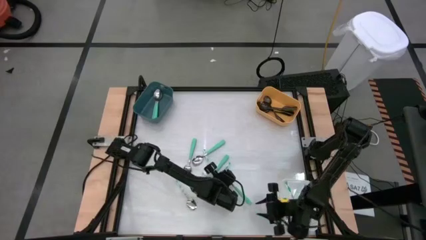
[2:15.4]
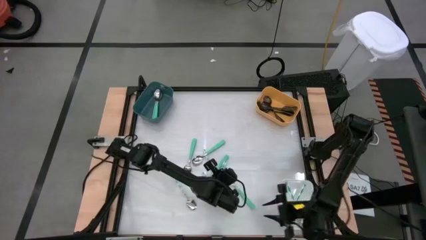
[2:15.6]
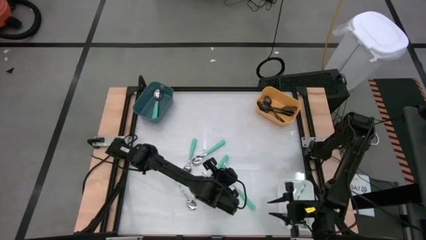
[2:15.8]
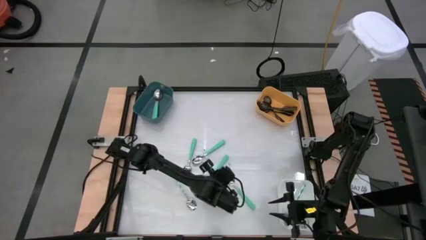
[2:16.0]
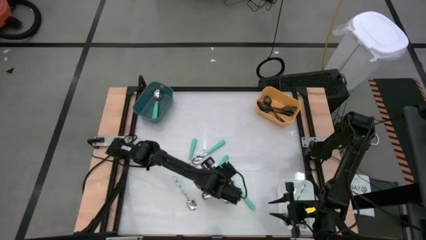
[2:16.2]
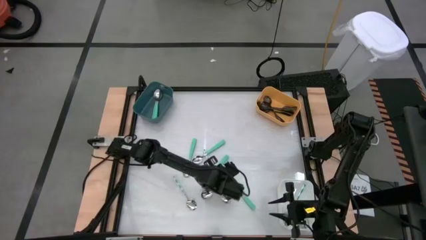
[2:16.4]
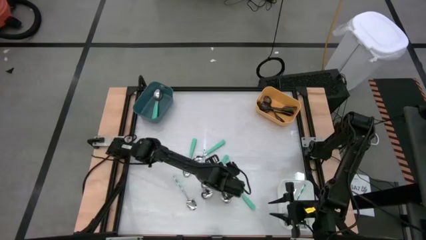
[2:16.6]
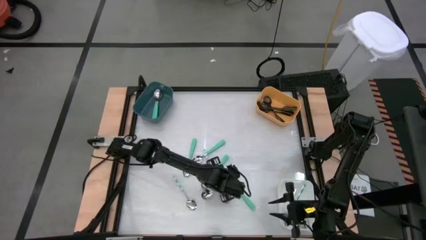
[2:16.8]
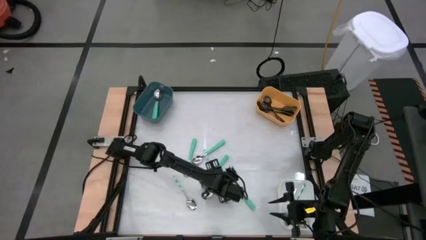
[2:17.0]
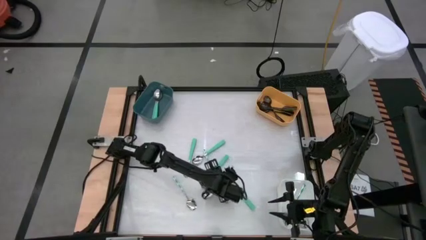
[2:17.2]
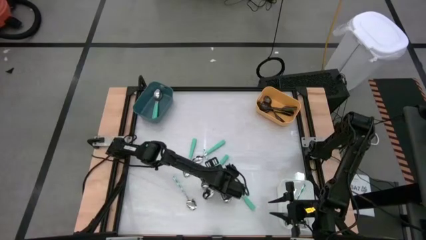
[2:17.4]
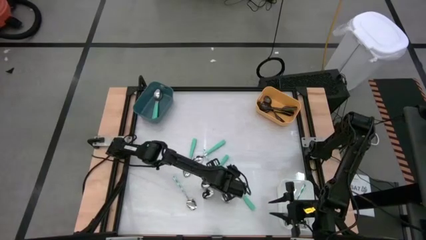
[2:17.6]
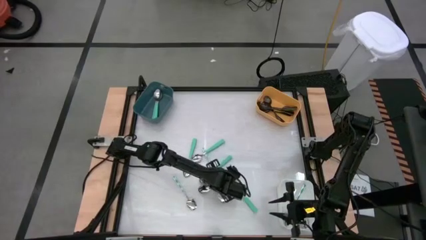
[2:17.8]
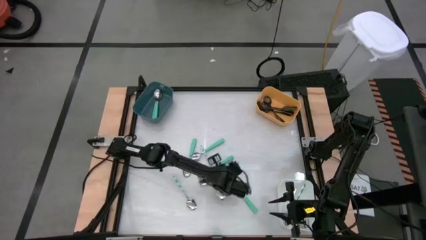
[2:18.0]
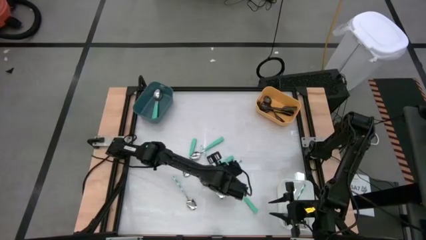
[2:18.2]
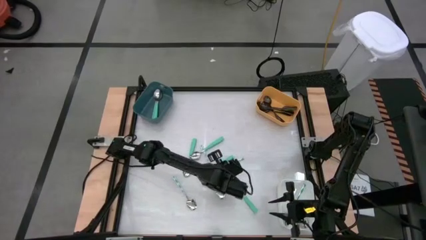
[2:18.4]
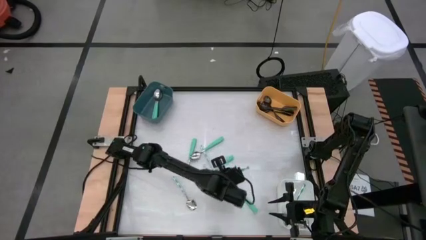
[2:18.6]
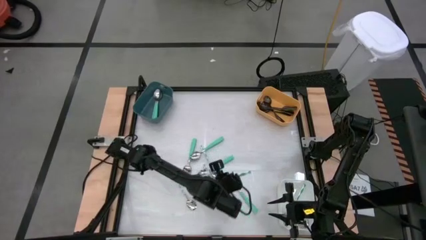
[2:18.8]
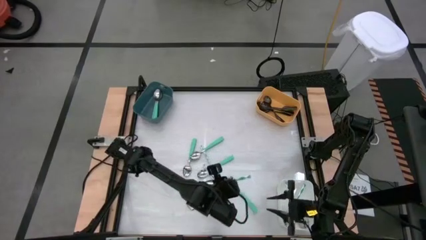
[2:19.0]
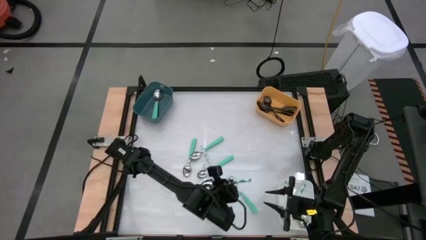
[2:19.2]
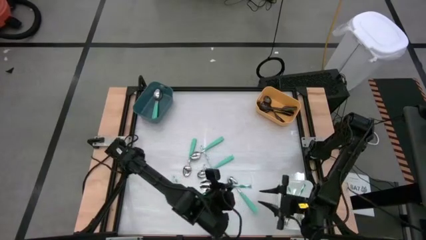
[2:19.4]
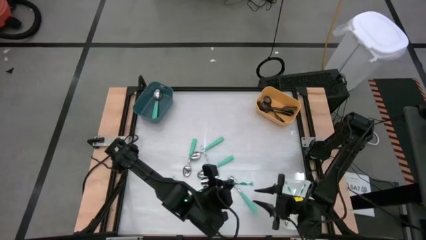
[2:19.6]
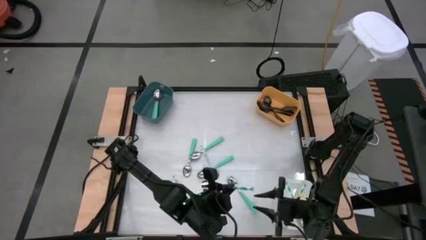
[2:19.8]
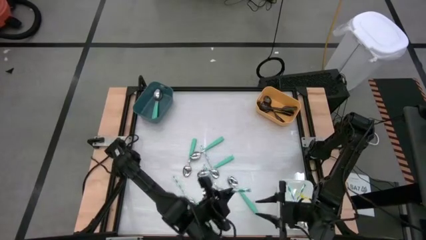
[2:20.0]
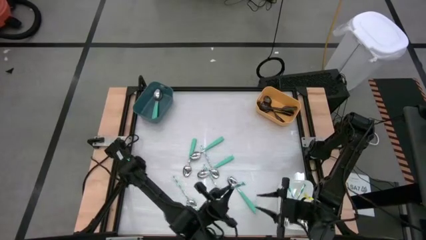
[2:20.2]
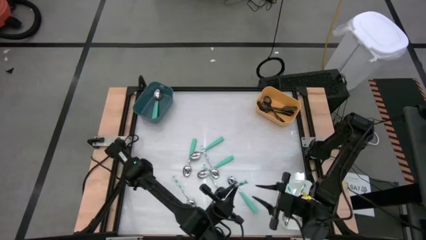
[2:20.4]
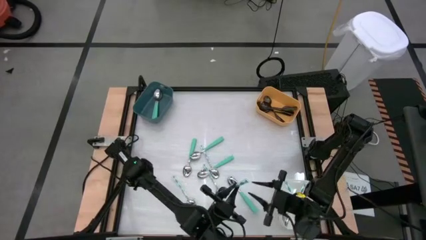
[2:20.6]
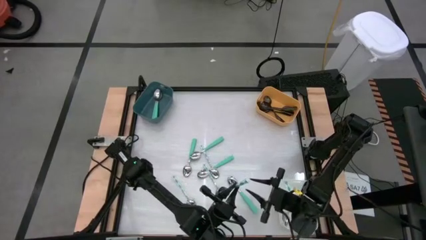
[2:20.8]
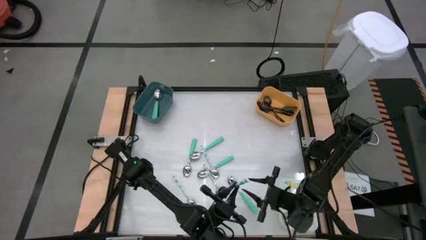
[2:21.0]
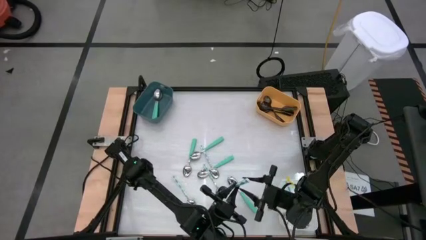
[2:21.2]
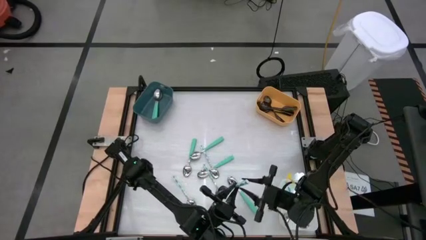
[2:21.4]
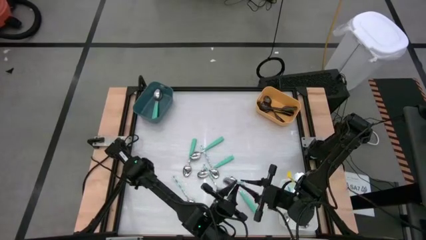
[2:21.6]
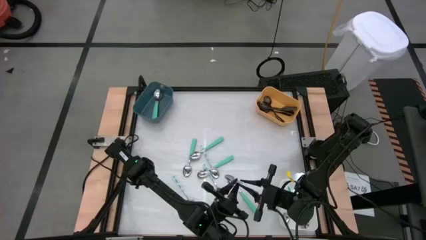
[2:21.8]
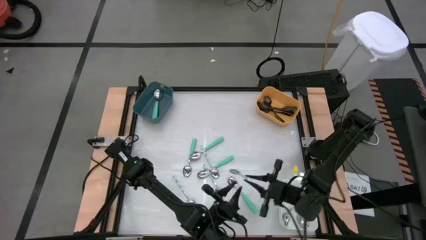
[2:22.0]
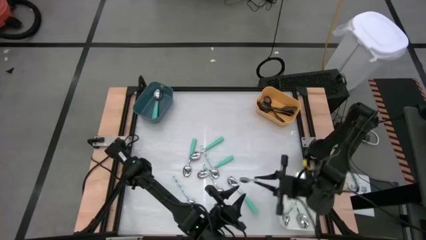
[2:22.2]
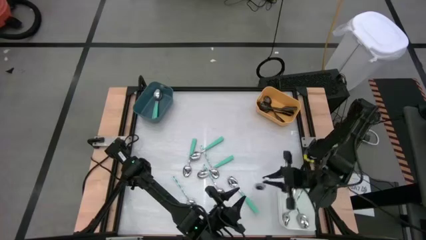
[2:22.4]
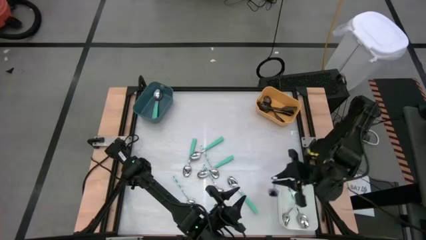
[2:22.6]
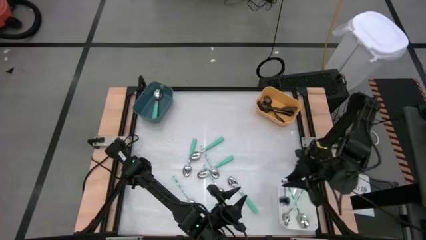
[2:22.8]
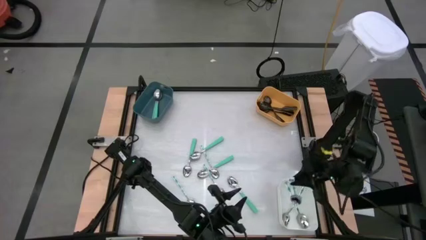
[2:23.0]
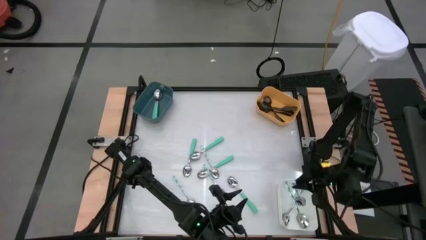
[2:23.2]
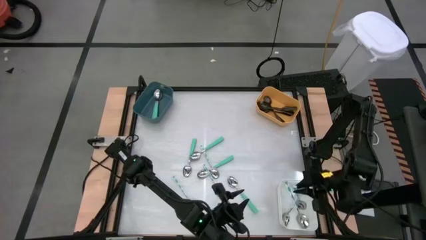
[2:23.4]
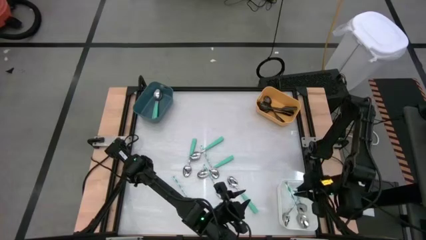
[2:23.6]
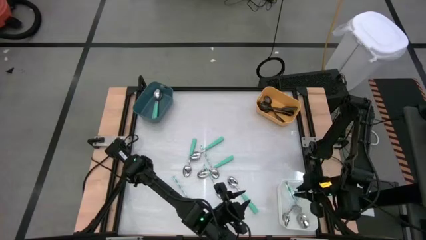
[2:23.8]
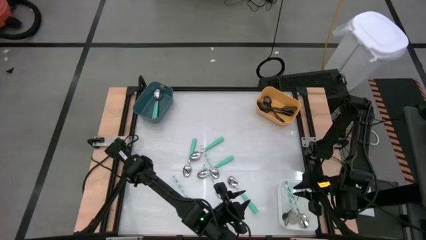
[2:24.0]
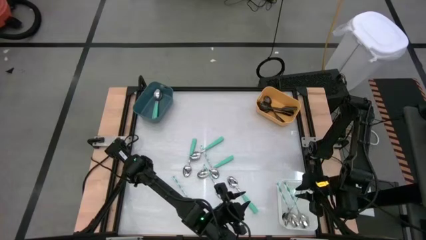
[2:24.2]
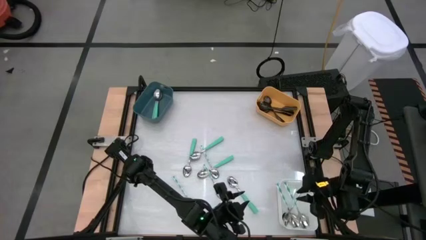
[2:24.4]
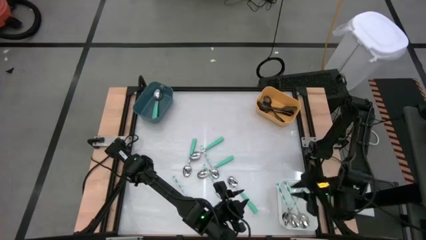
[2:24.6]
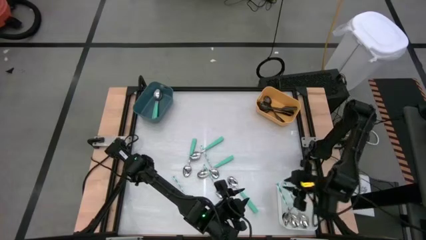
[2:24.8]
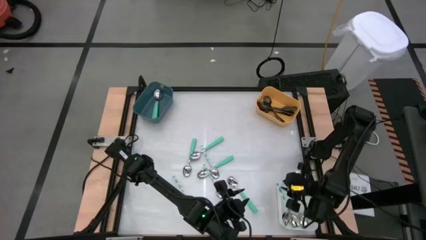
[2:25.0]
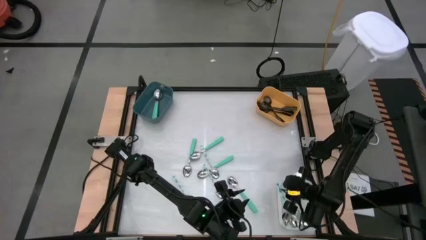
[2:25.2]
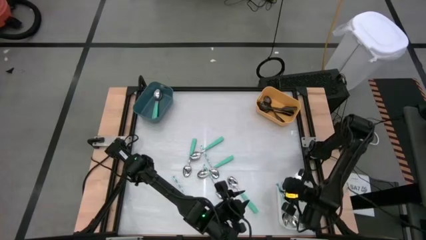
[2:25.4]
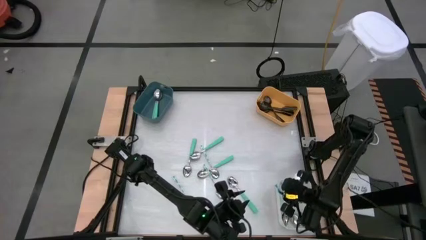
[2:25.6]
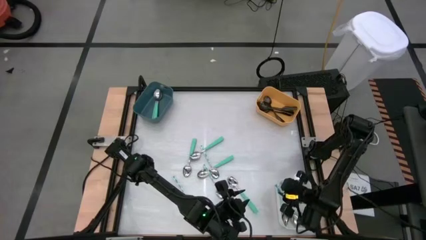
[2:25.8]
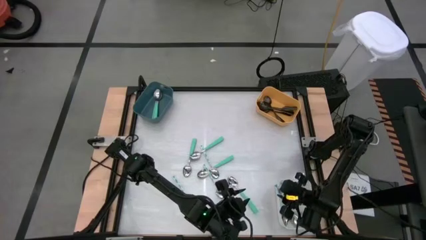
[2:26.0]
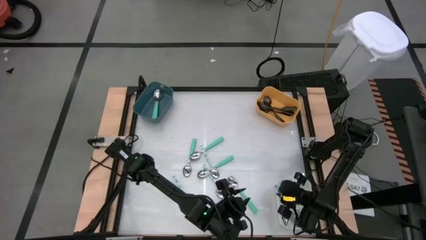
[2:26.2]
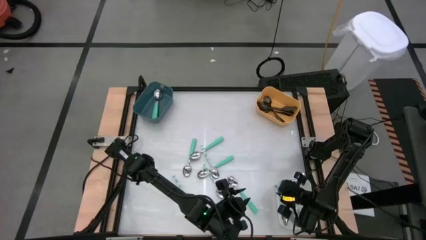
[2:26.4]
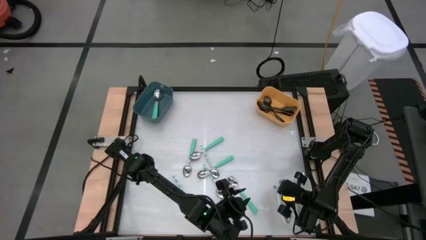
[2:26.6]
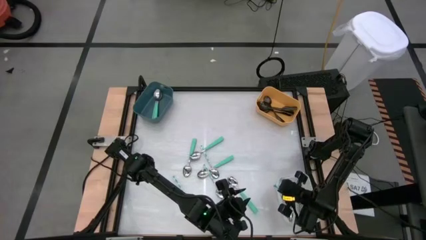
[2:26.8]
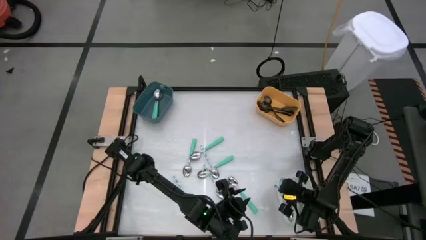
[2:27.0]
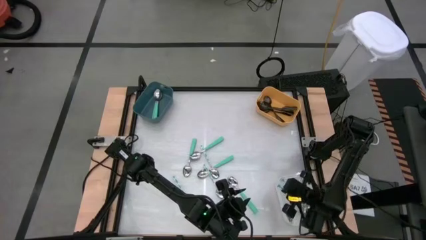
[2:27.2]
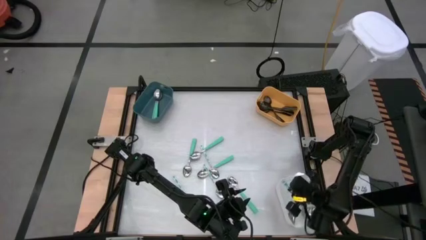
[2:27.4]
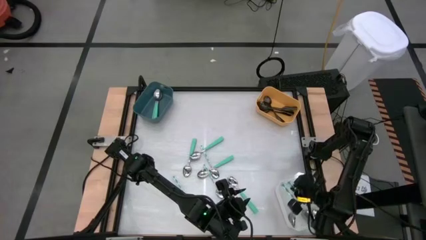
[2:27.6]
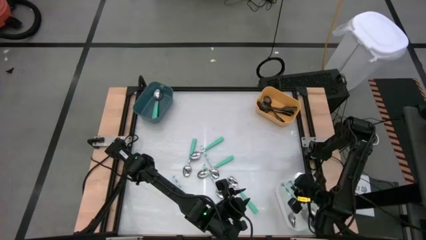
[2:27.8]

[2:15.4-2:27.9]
Task: Sort silverware by color (type)
Put the patterned green spoon into the white bin

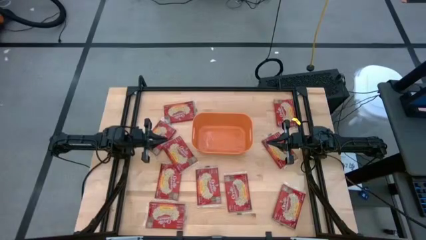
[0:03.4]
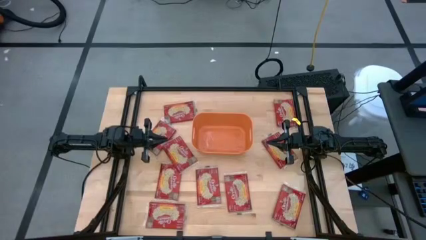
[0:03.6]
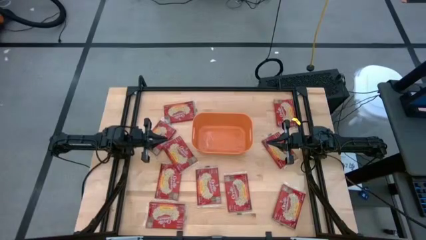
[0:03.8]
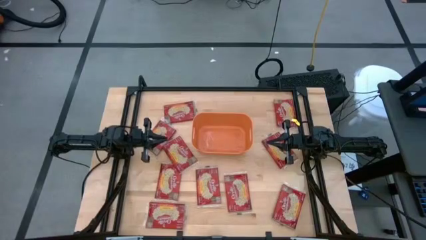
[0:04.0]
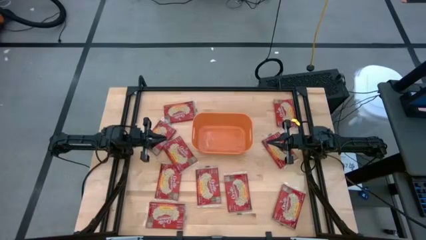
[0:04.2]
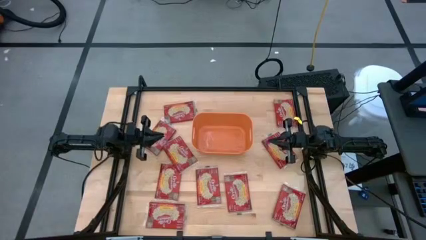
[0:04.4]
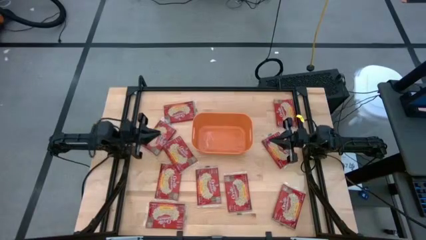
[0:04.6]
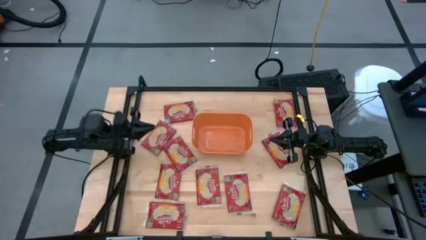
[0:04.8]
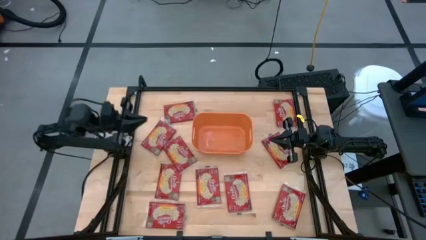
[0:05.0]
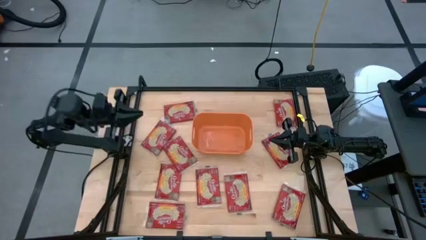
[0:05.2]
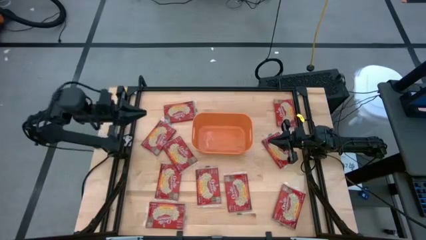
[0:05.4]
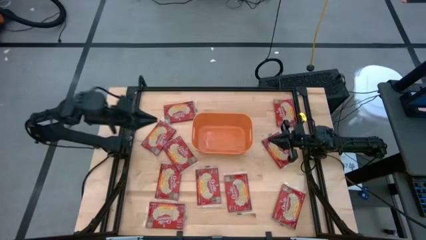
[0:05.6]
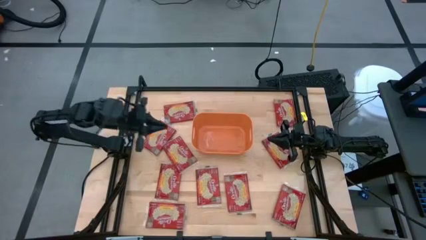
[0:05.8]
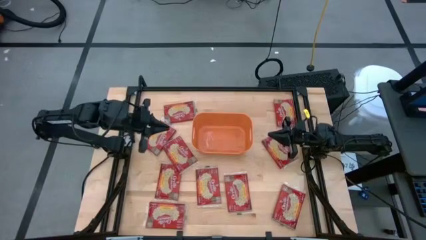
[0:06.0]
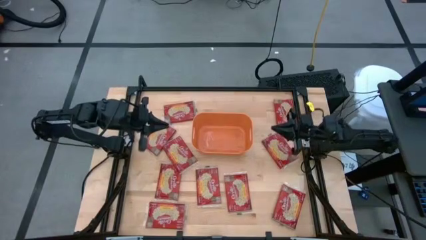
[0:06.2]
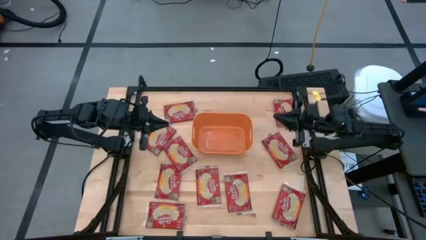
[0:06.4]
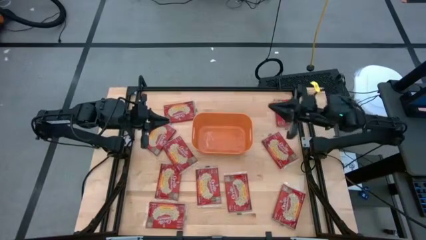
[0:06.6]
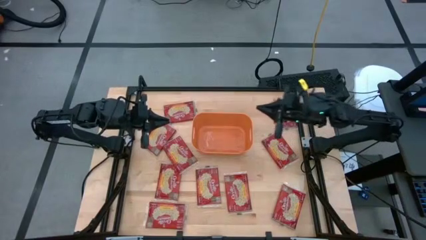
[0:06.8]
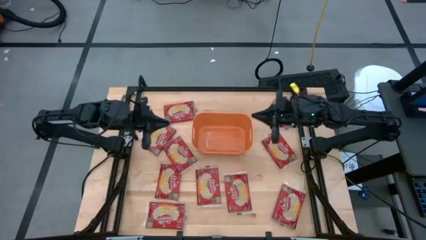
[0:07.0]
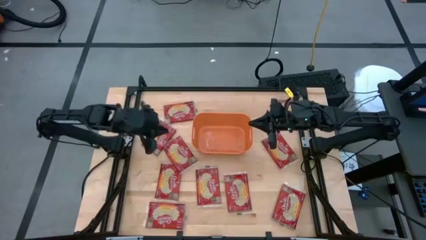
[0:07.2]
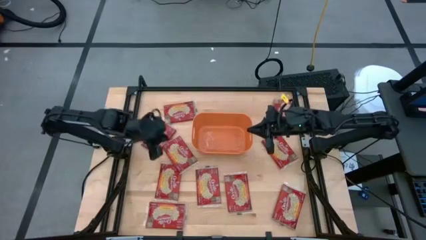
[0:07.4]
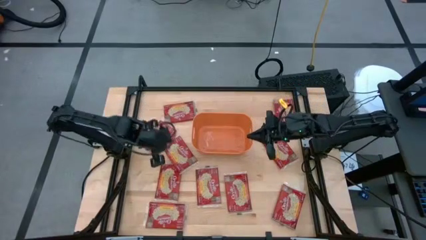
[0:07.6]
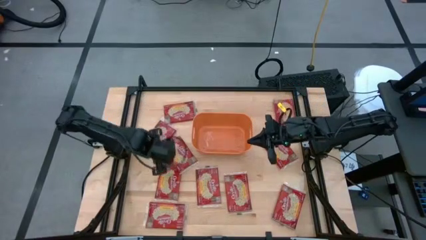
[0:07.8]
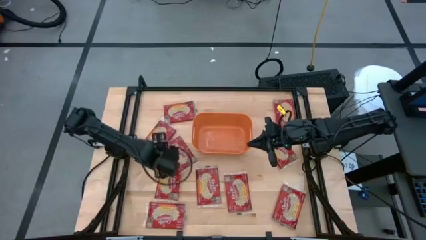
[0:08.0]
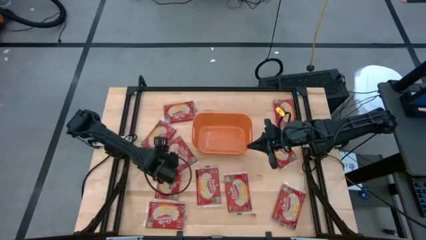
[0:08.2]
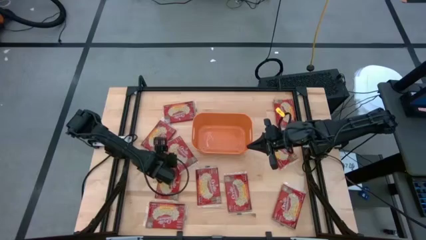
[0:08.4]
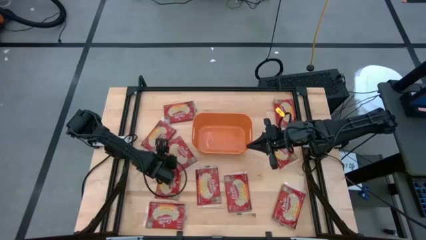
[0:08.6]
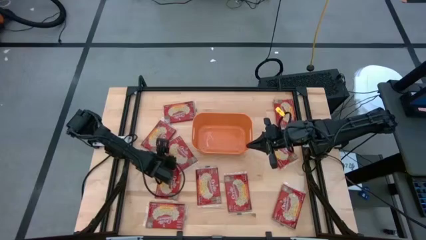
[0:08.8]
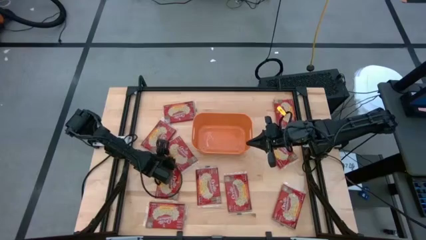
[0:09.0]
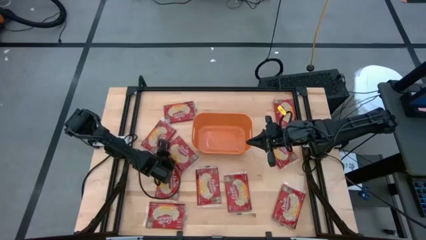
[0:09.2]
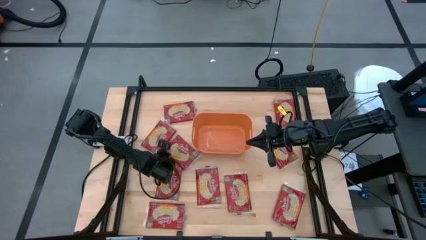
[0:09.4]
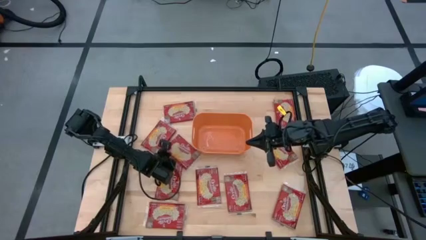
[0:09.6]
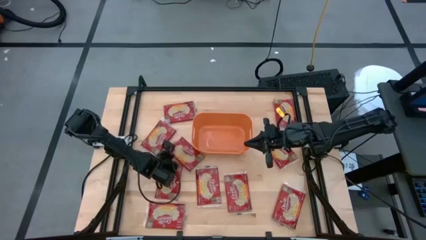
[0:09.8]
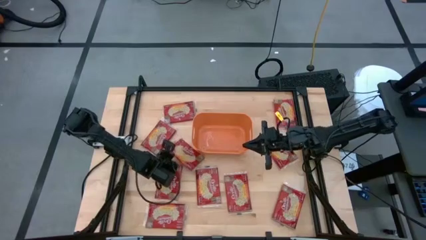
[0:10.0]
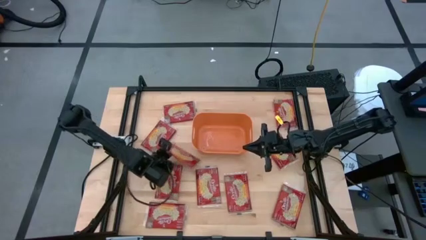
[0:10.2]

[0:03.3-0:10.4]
Task: Sort popcorn bags into baskets
Put the red popcorn bag into the orange bin
